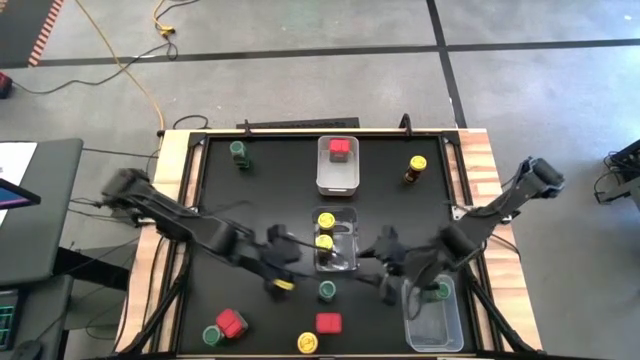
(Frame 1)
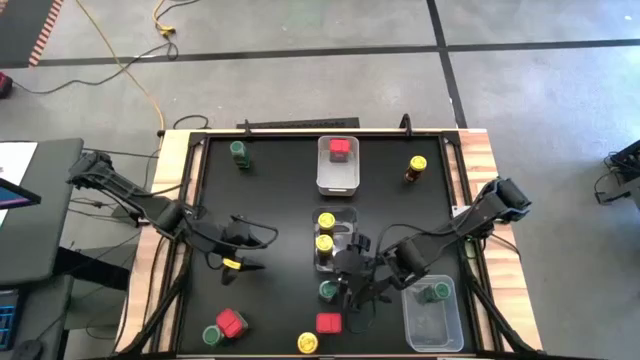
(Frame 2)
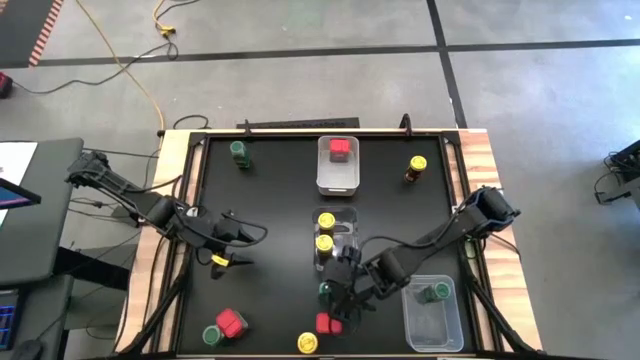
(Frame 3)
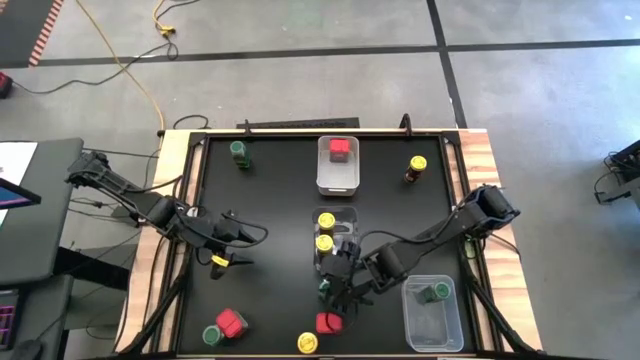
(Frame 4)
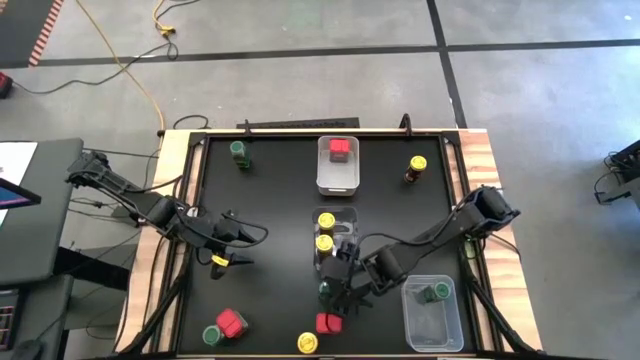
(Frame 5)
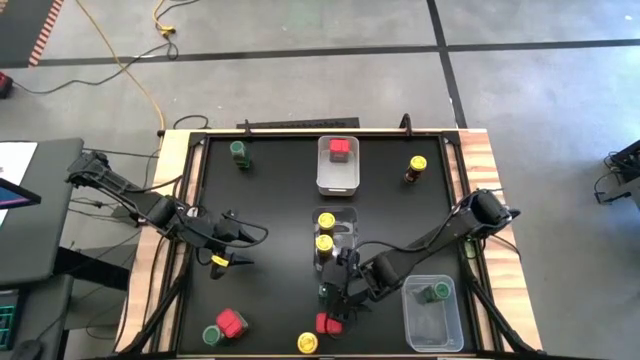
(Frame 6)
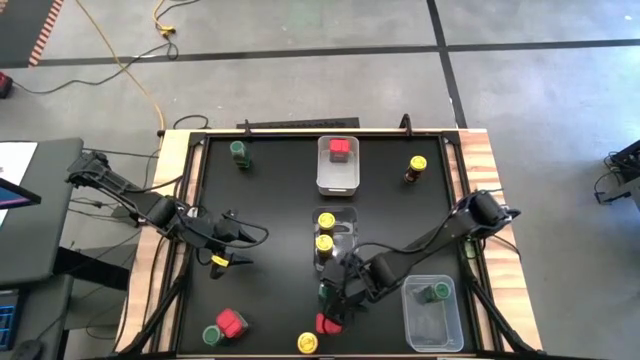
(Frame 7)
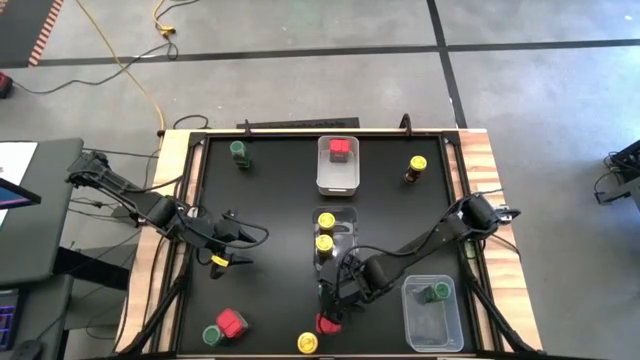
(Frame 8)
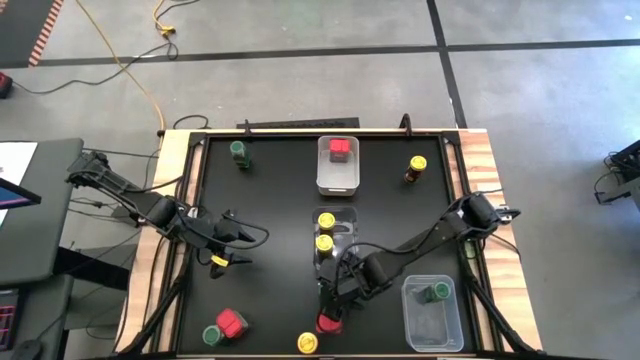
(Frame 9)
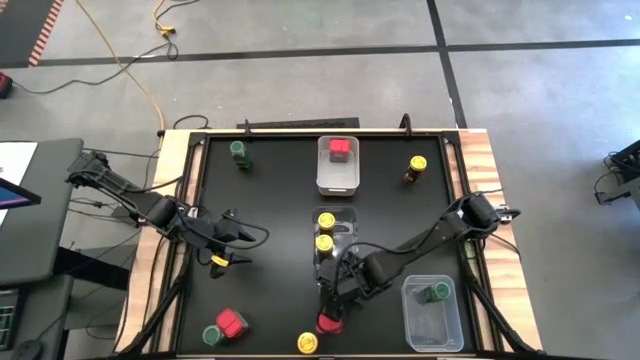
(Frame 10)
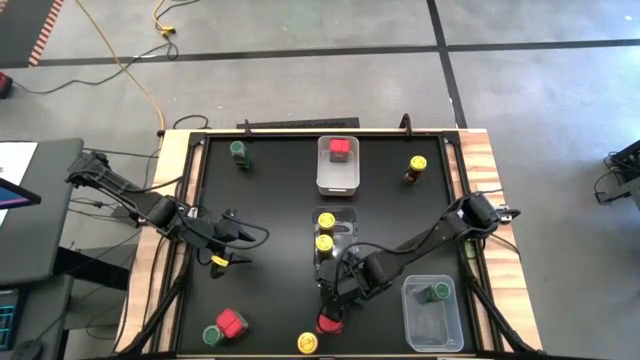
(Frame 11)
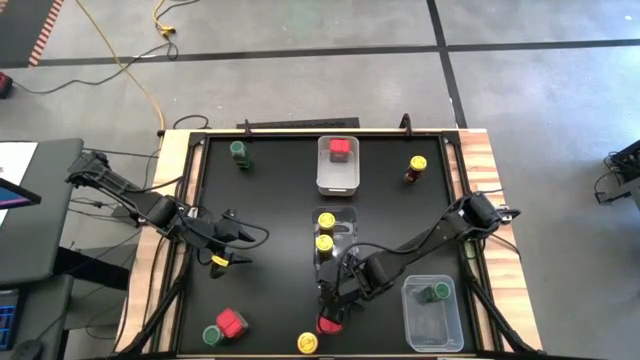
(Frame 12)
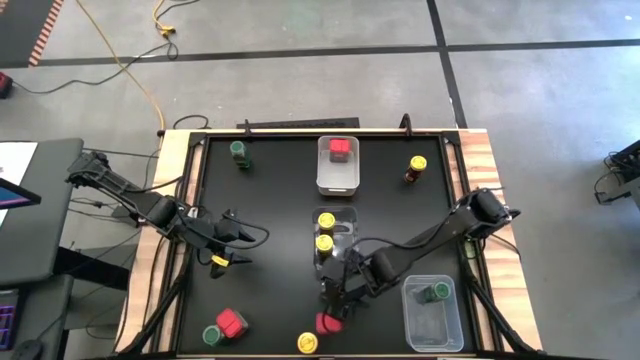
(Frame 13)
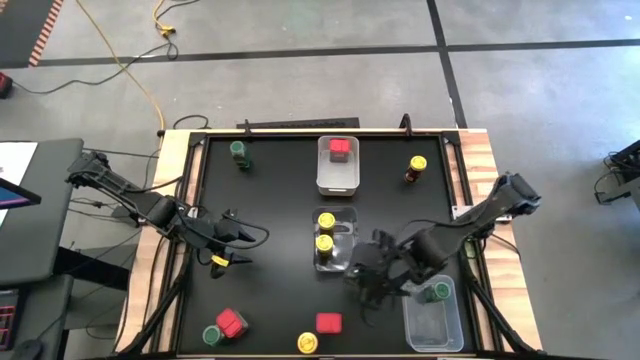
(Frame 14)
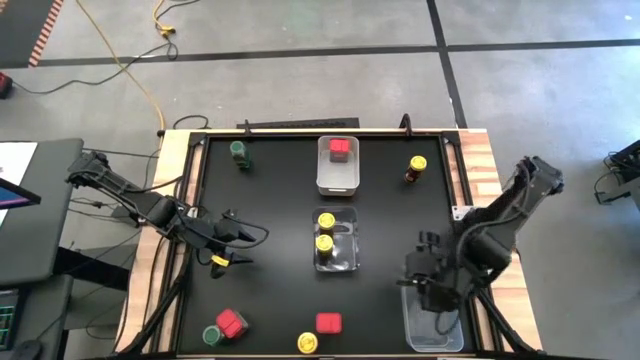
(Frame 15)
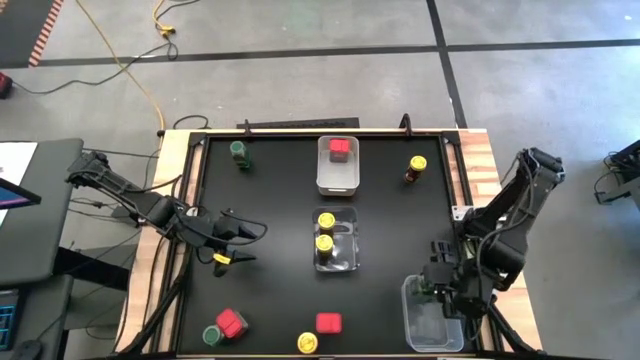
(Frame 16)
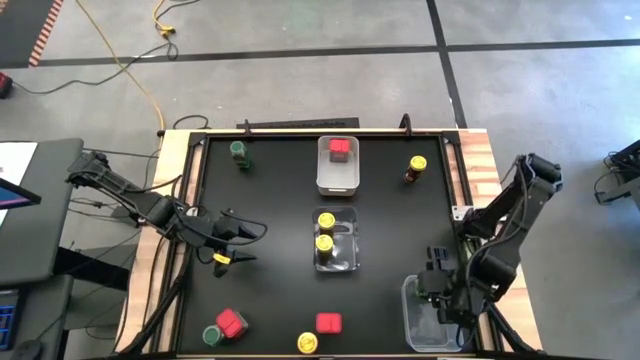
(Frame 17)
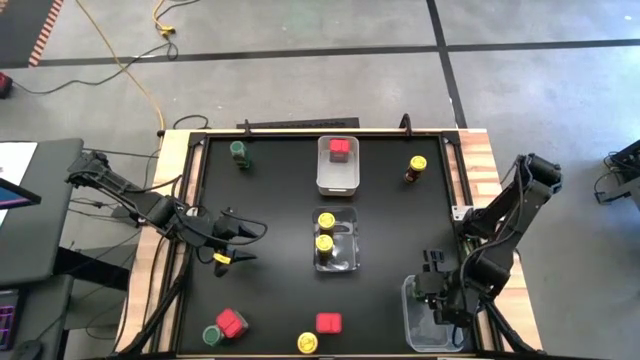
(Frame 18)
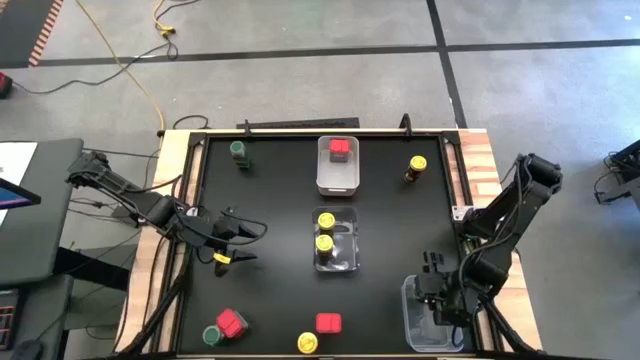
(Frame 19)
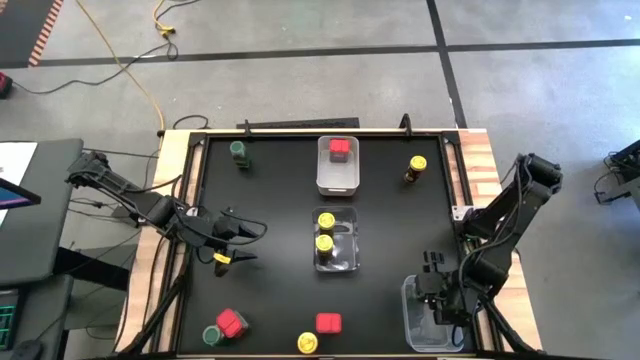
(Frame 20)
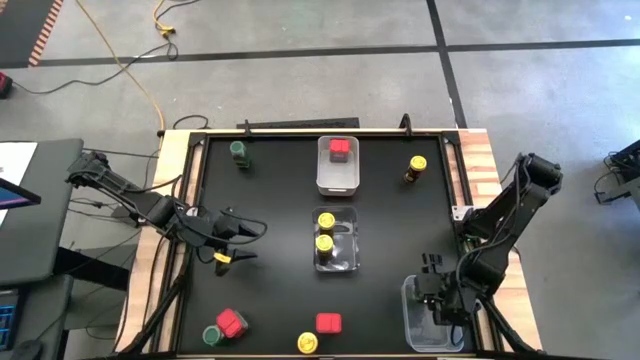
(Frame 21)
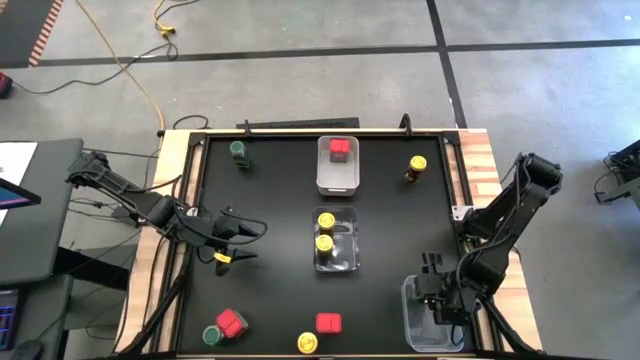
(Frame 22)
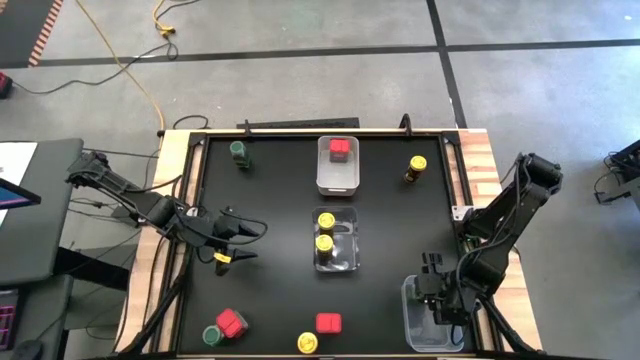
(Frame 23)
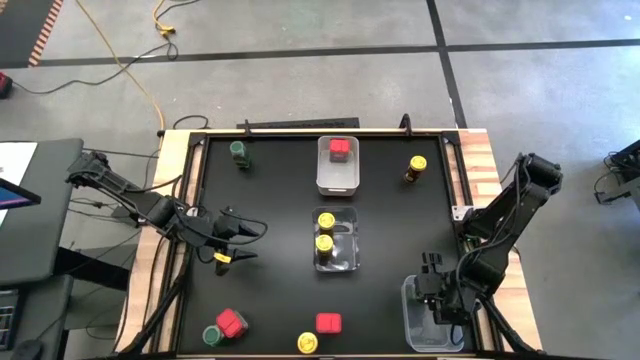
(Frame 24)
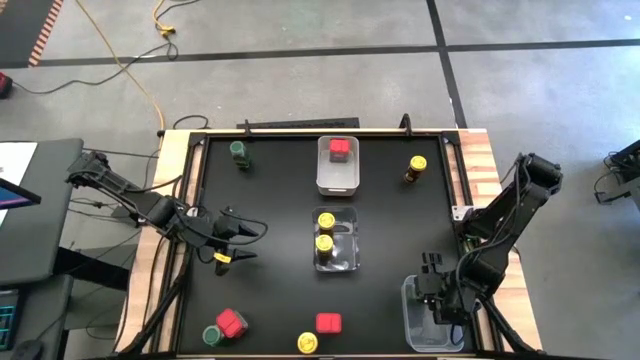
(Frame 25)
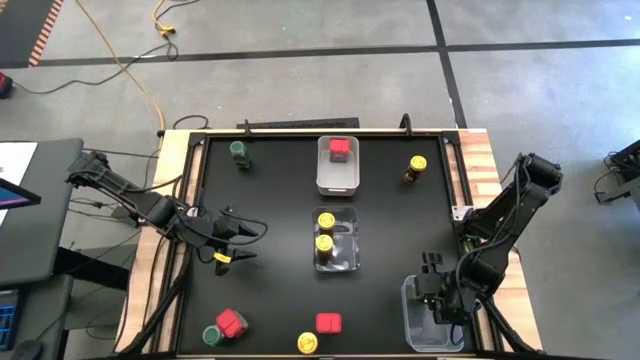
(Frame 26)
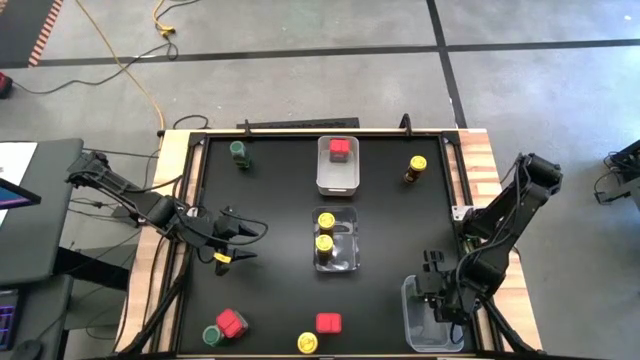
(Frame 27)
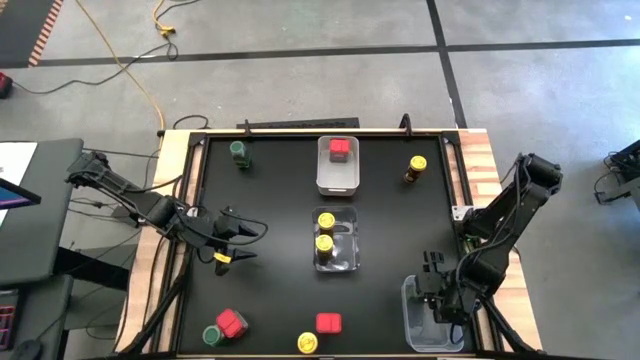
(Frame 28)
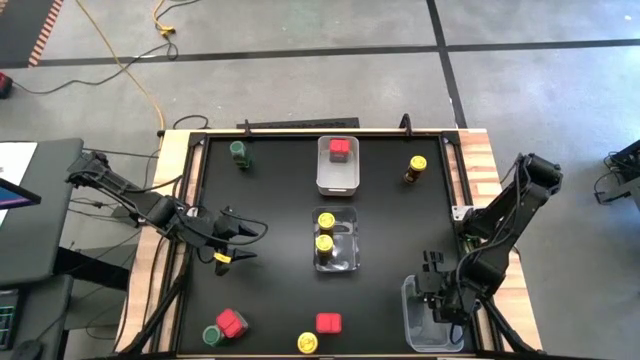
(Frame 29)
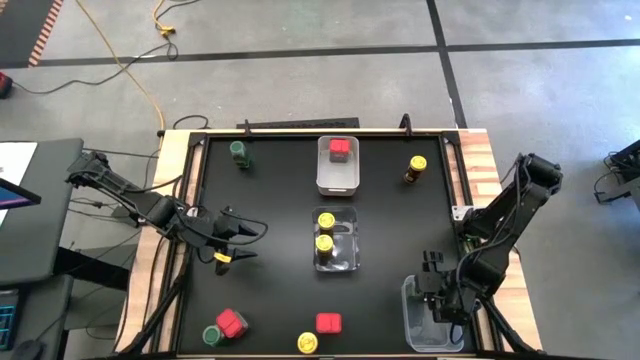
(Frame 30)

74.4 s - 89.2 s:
Task: Sort spices by type
Put the middle right green seasoning bottle into the transparent bin

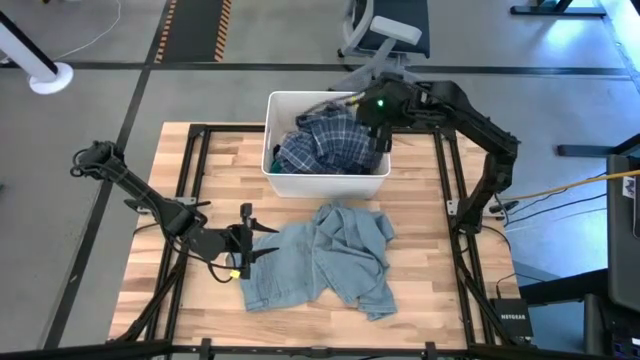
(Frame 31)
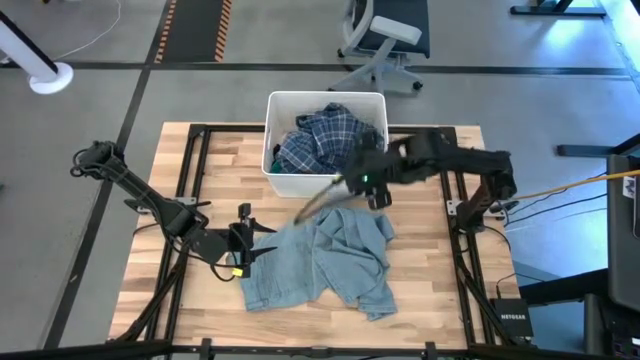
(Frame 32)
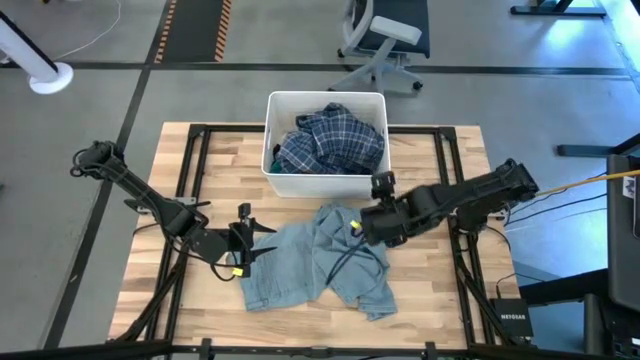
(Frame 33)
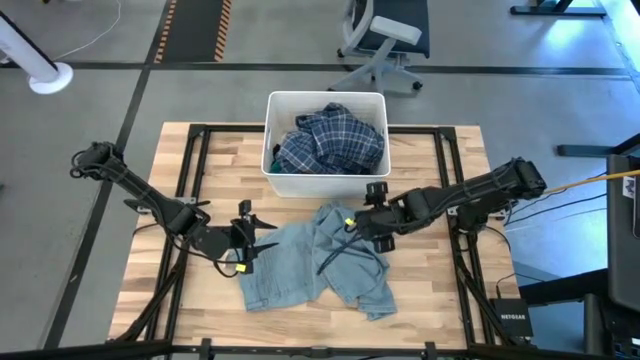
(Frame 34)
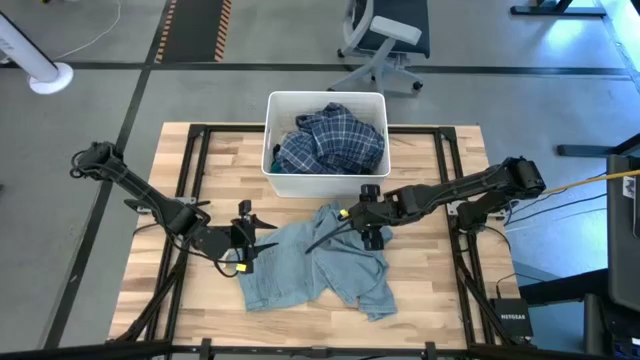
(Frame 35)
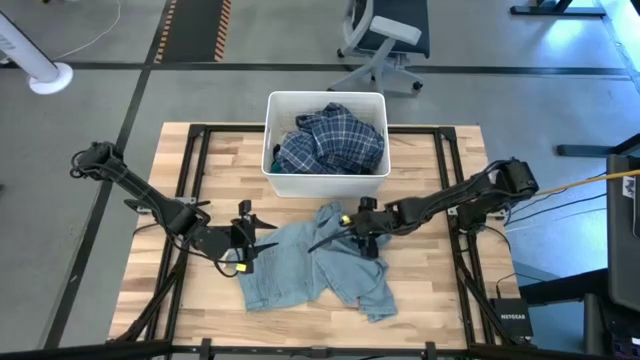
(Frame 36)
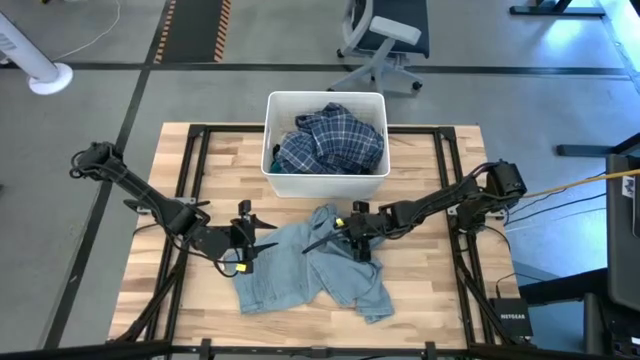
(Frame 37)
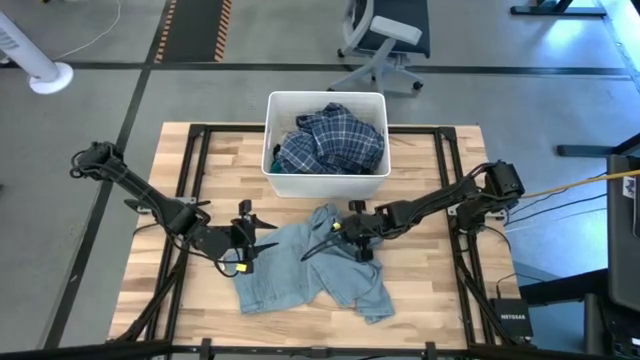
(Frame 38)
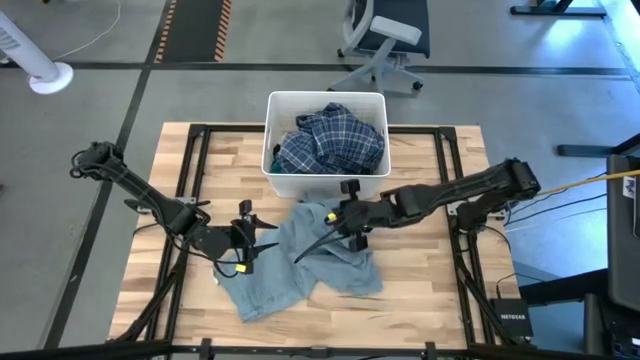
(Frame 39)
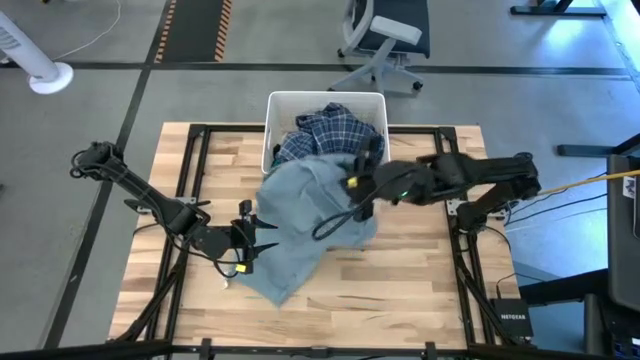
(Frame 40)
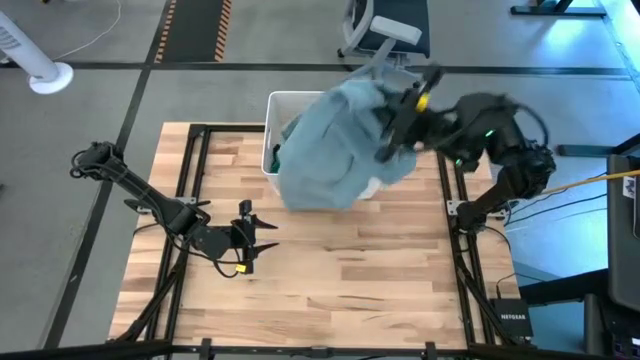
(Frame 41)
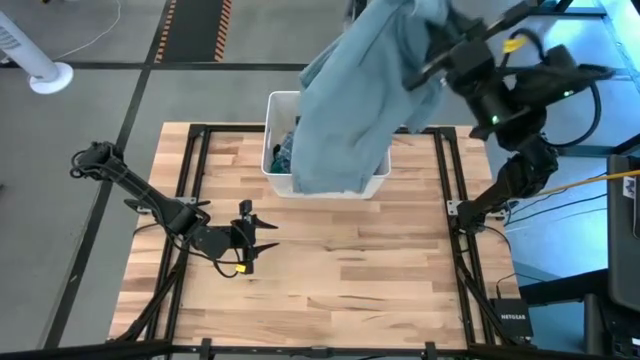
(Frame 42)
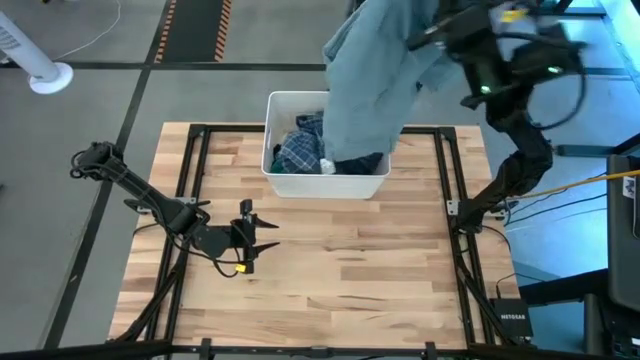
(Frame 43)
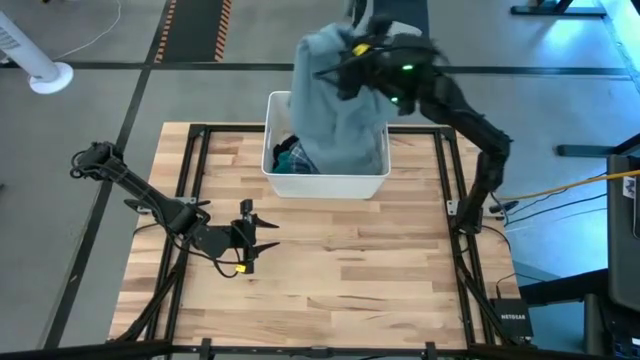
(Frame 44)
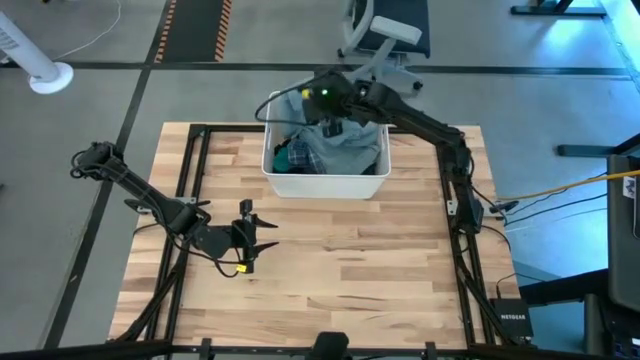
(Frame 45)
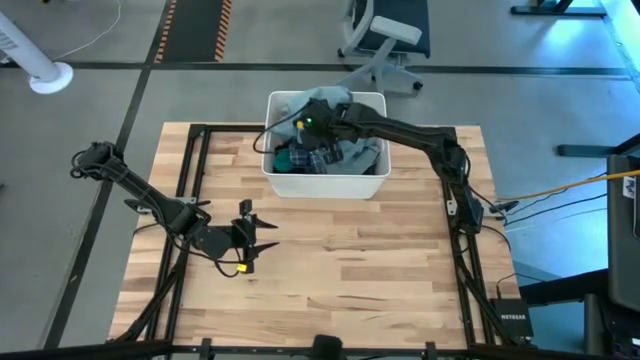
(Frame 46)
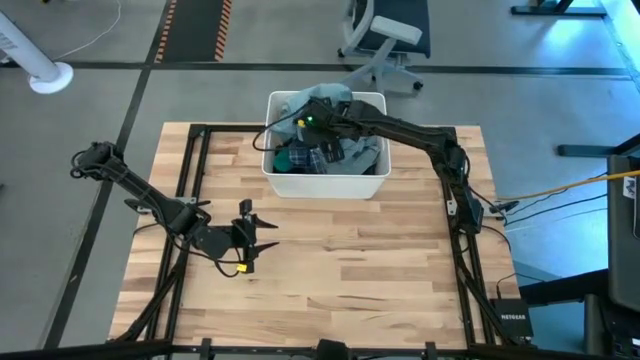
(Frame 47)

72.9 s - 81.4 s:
Task: Sort clothes
Put the blue pants into the white laundry bin
